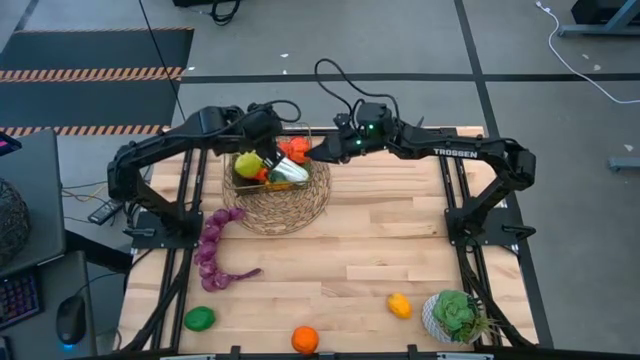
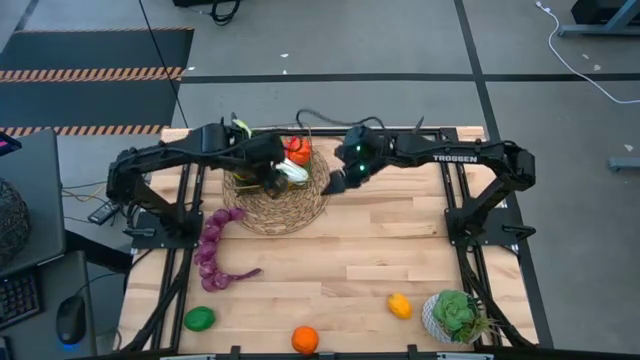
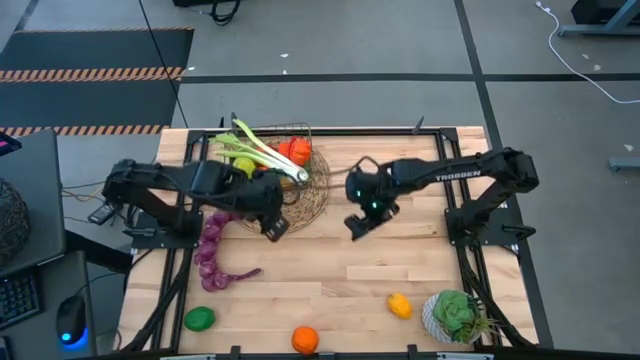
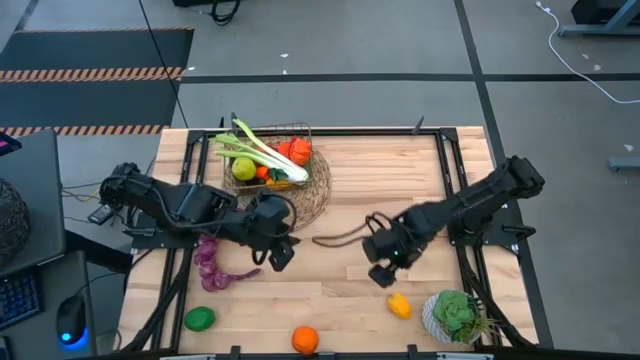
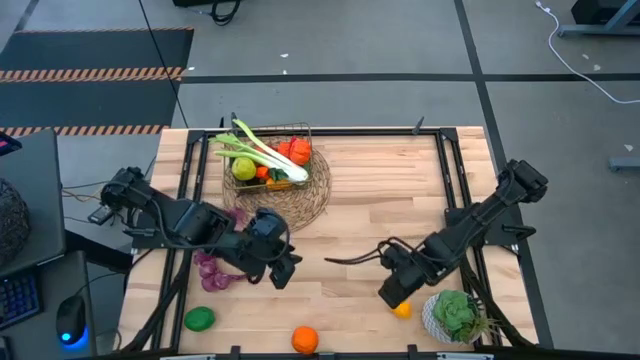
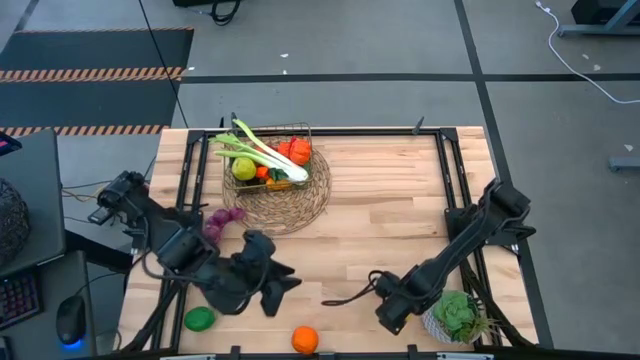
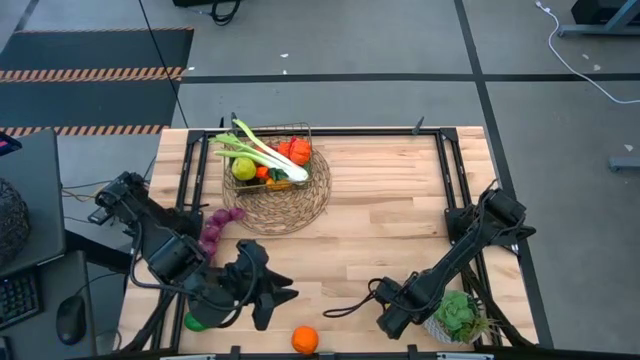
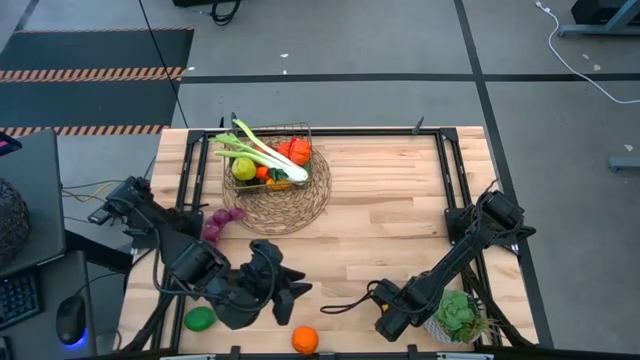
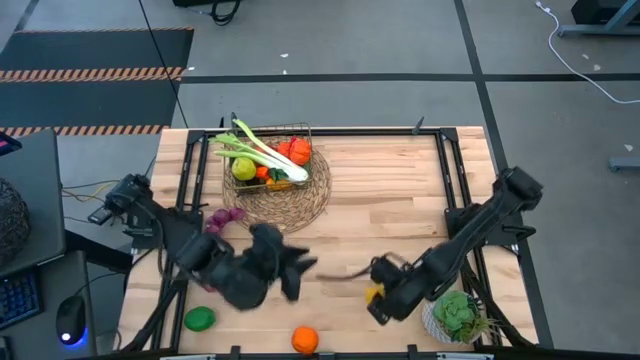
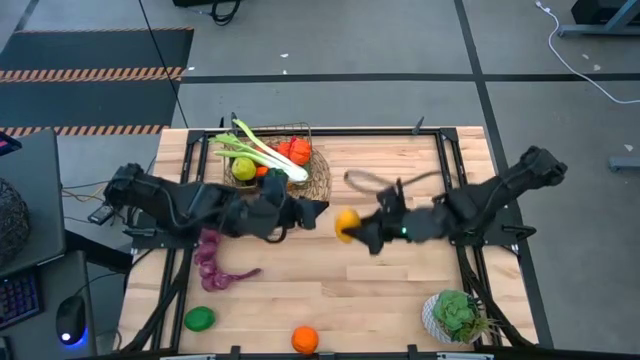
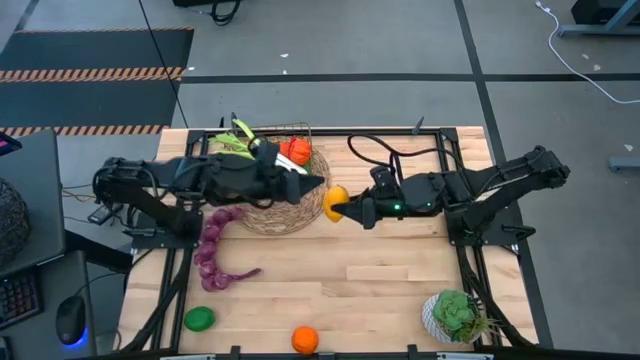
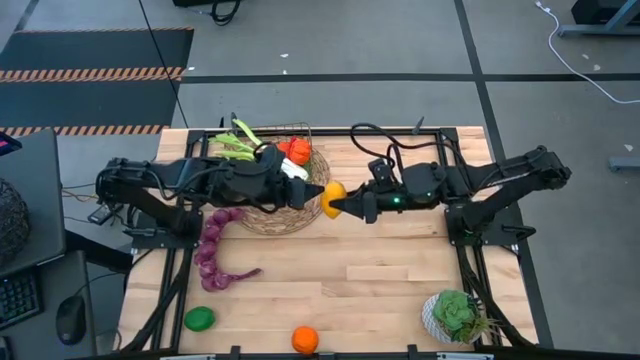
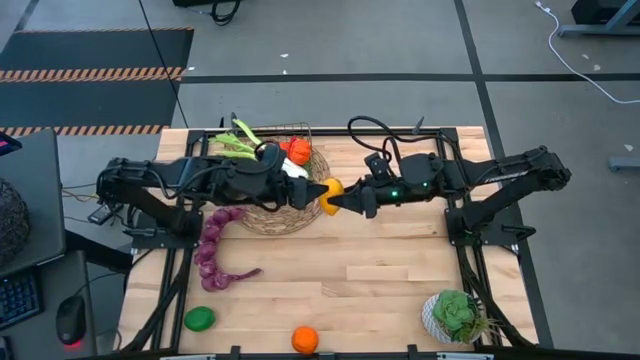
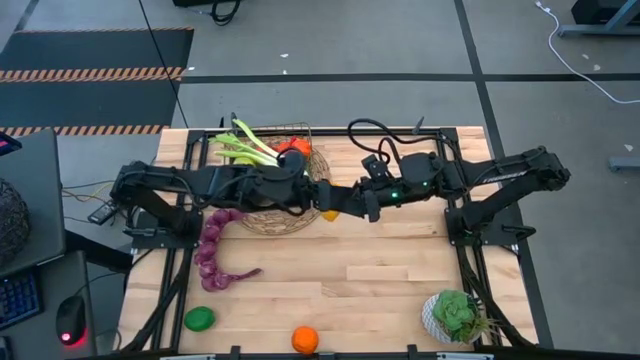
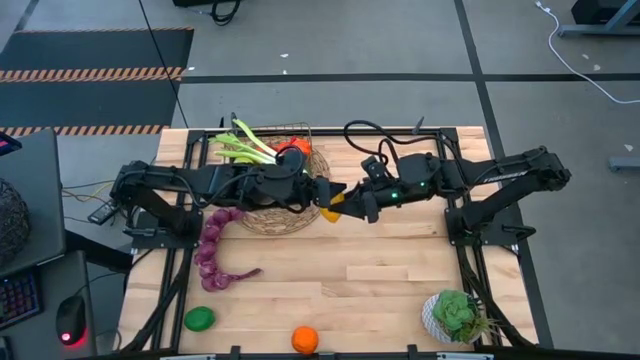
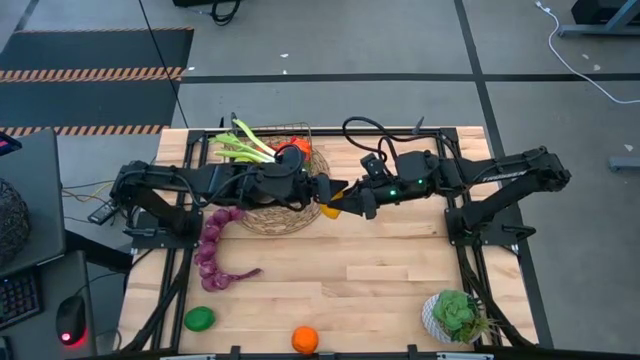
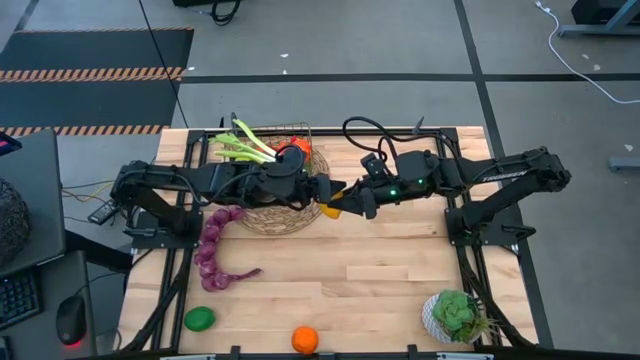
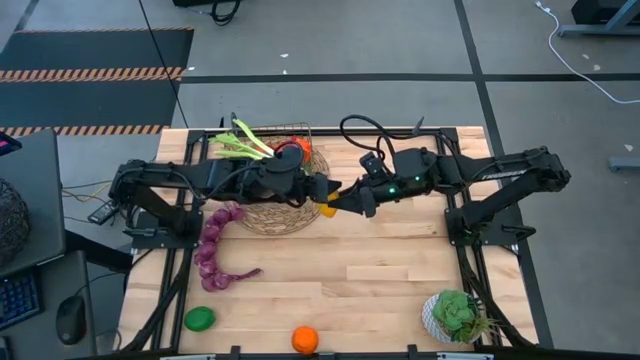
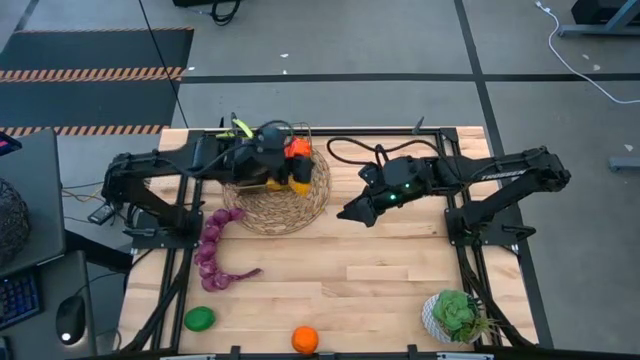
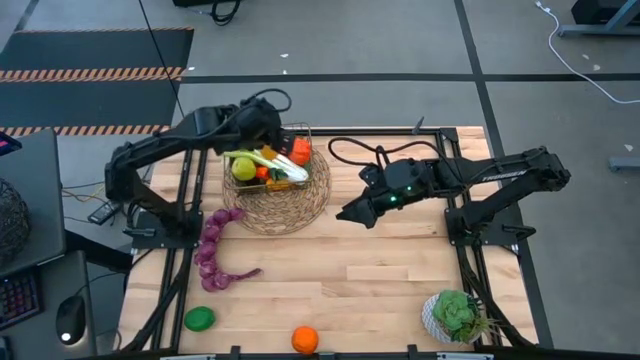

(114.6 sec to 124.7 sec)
Task: Build produce basket
Put the yellow lemon into the wire basket

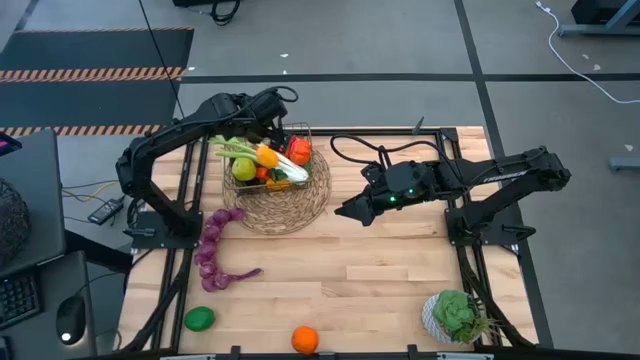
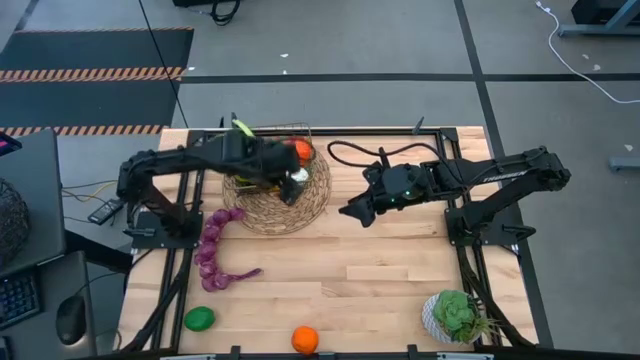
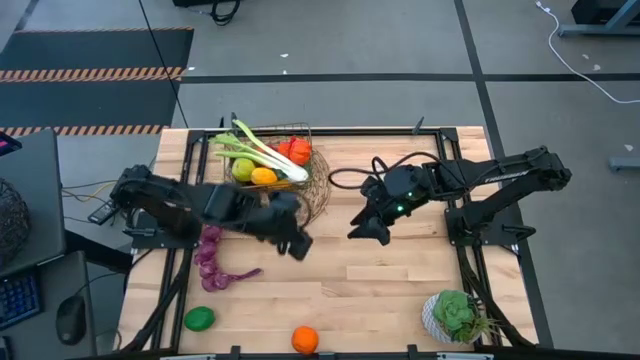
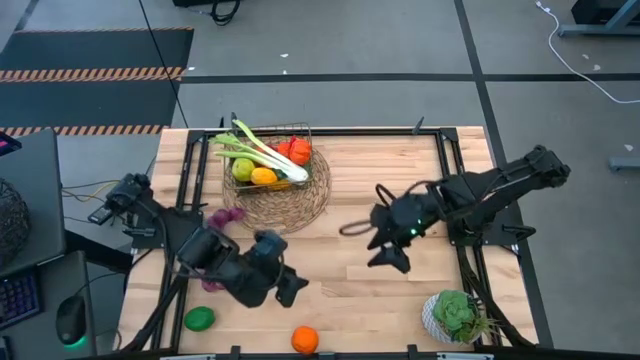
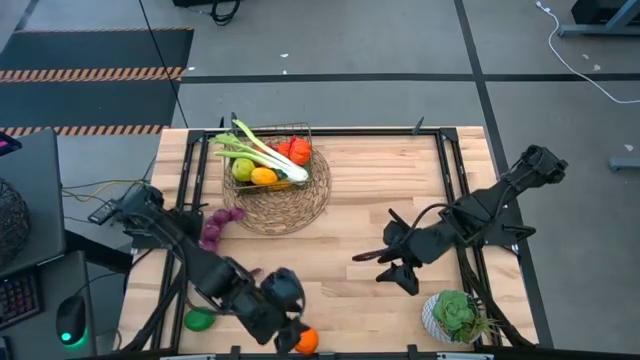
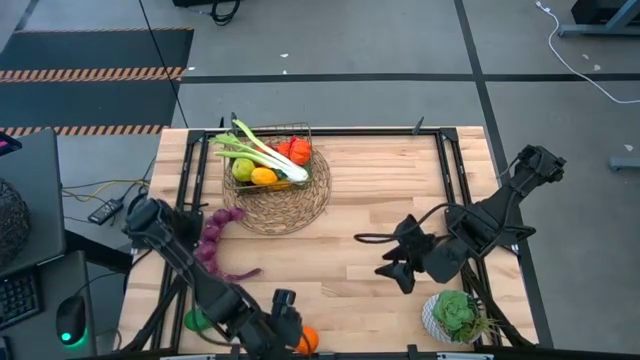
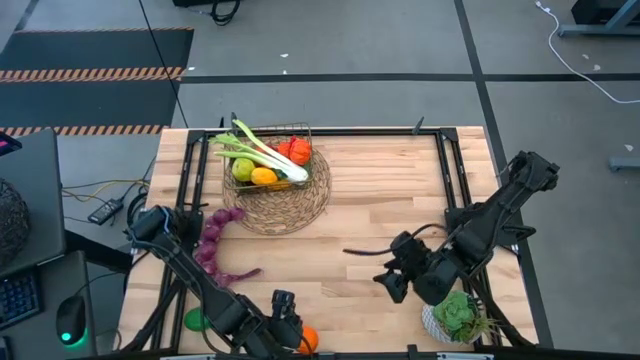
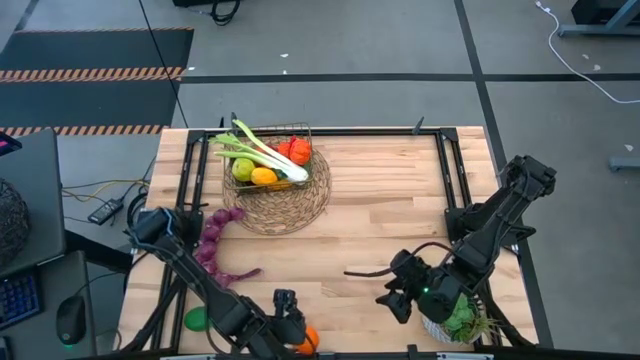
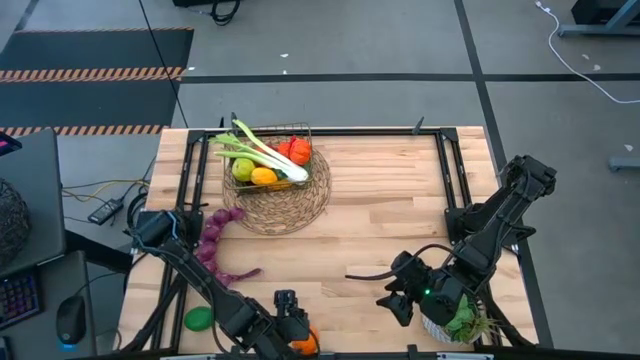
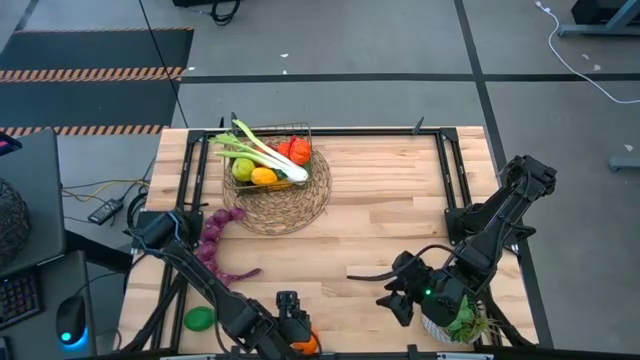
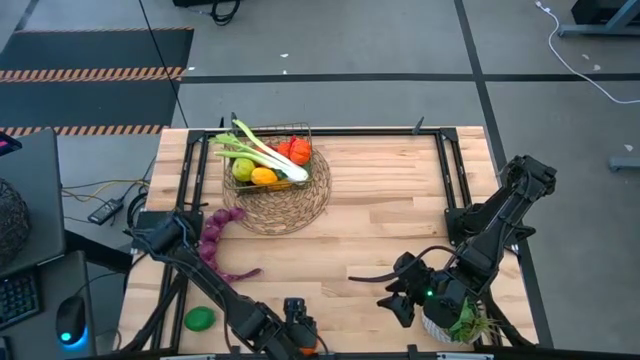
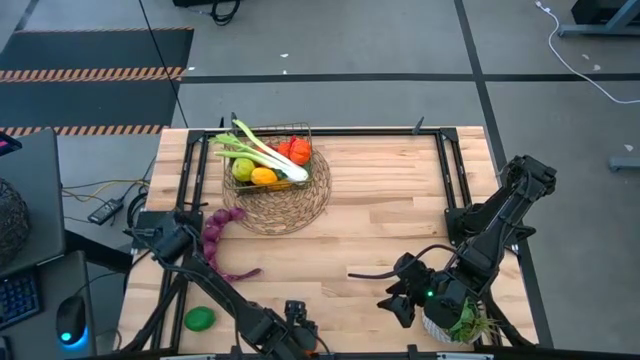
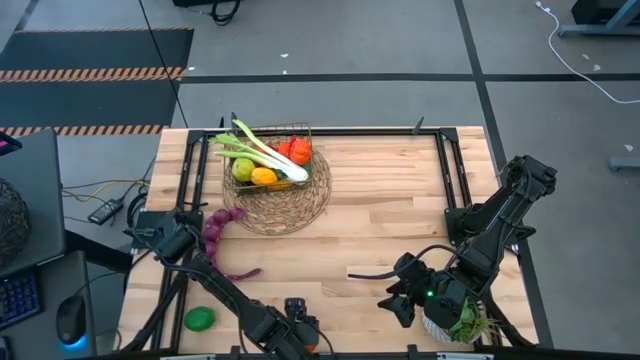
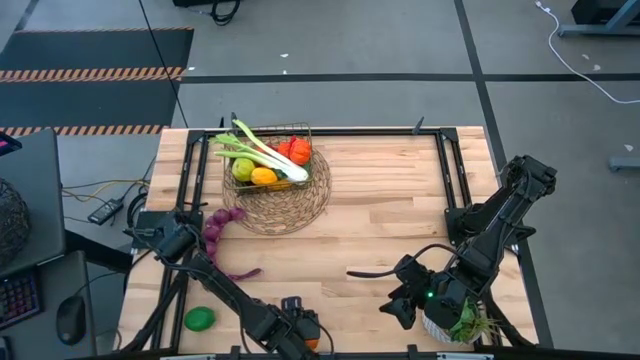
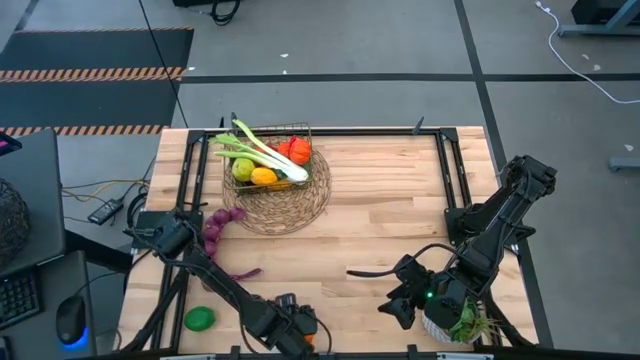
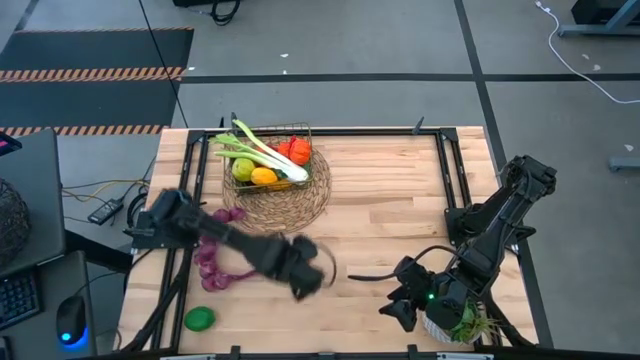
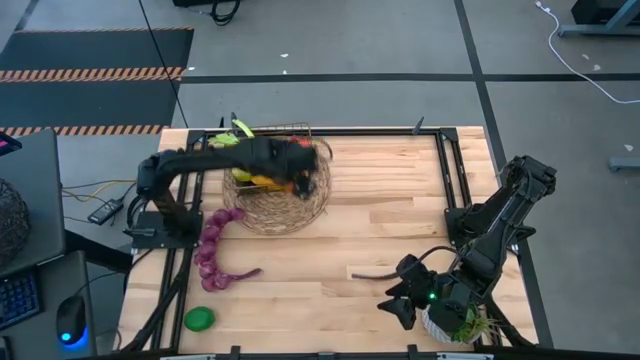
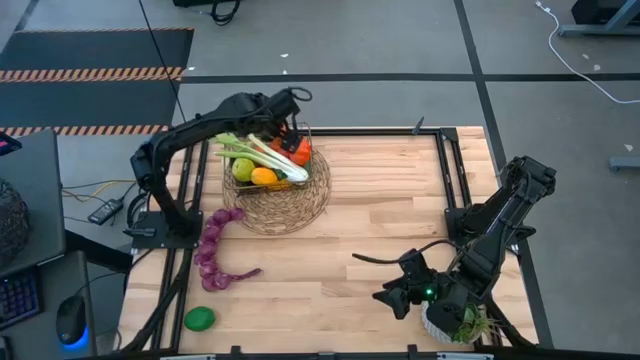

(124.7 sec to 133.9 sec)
Put the orange into the wire basket

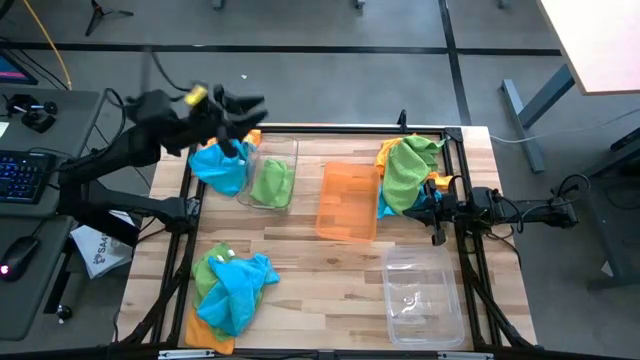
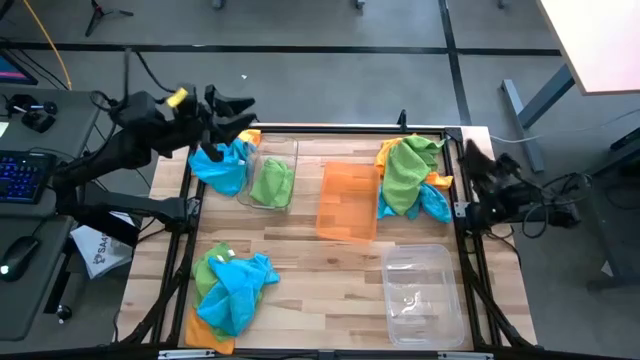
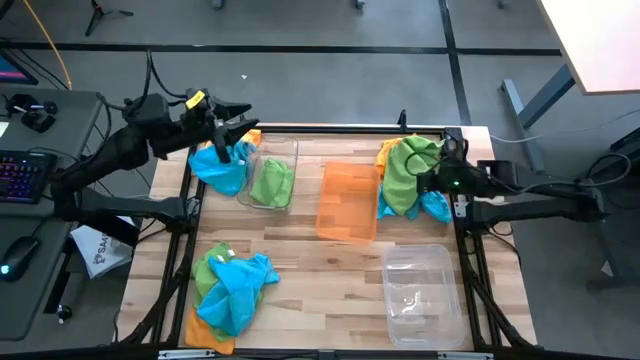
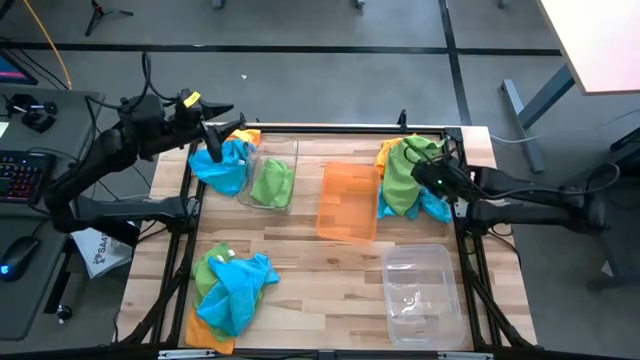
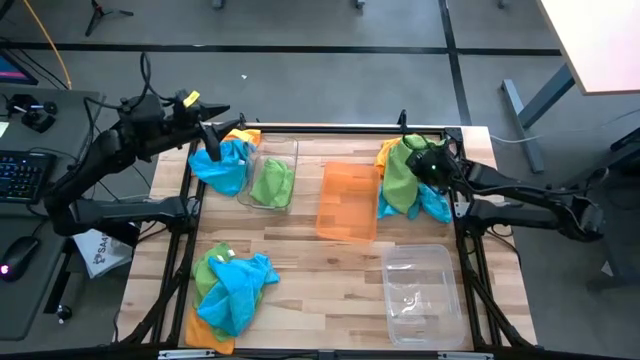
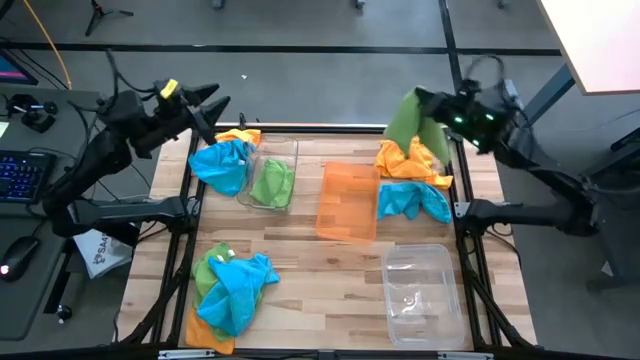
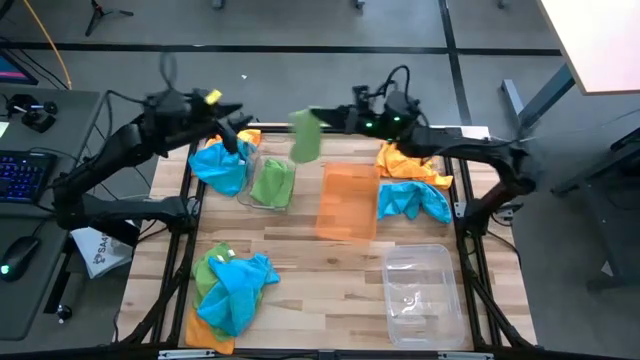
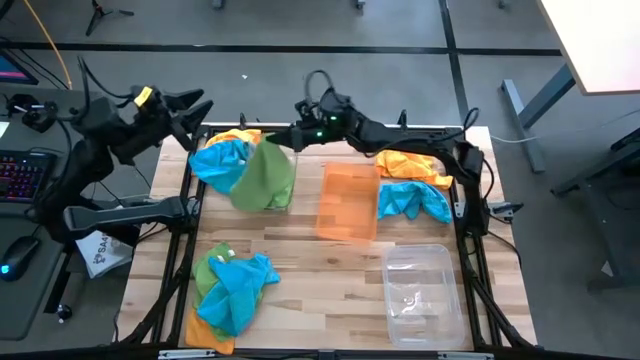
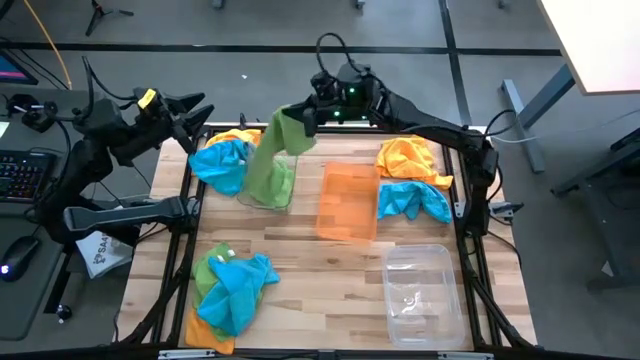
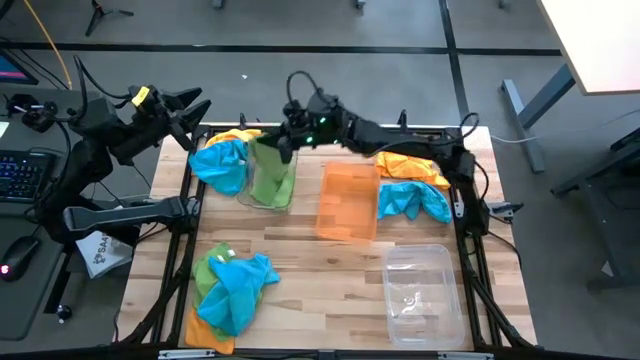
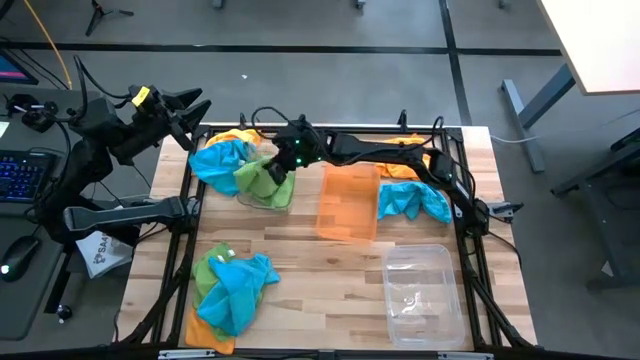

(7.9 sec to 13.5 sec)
Task: Sort microfiber towel by color & place in baskets
Put the top green microfiber cloth into the transparent bin
